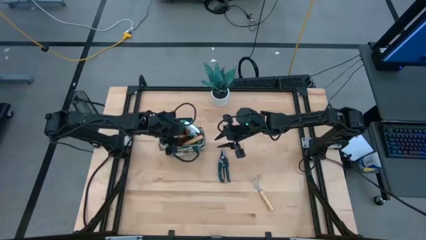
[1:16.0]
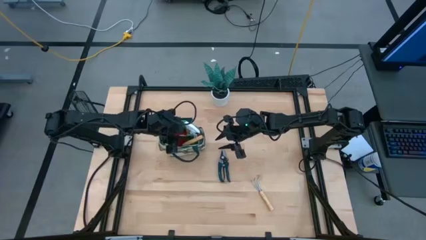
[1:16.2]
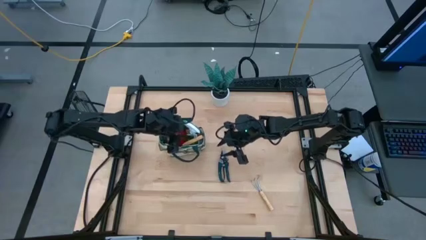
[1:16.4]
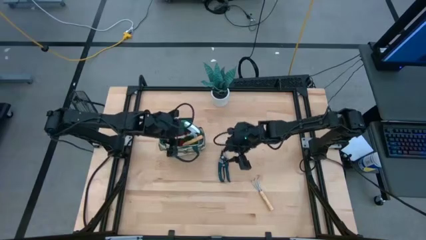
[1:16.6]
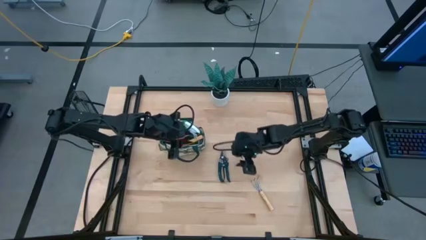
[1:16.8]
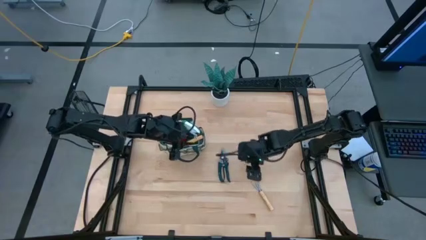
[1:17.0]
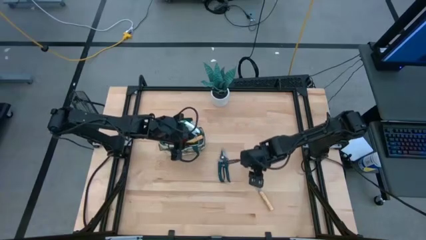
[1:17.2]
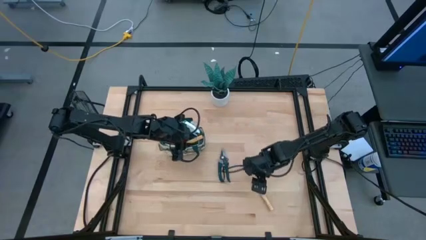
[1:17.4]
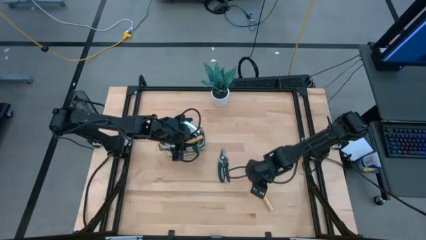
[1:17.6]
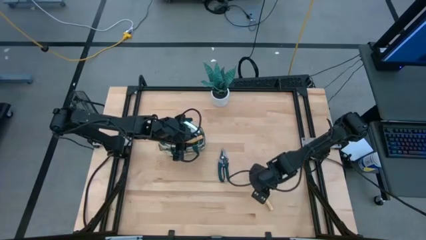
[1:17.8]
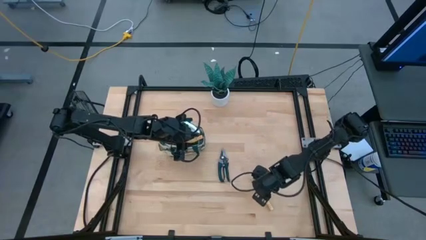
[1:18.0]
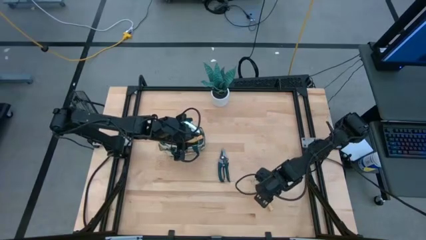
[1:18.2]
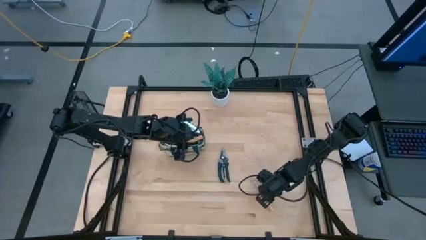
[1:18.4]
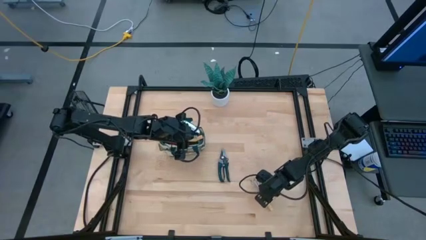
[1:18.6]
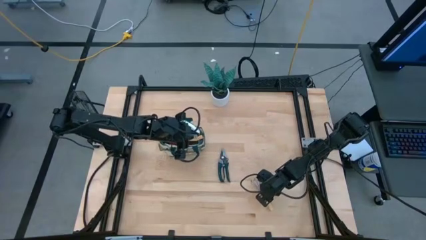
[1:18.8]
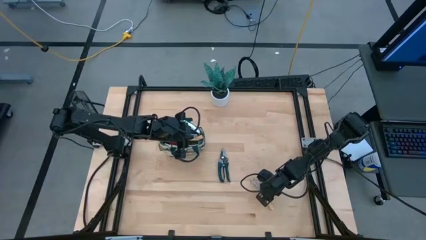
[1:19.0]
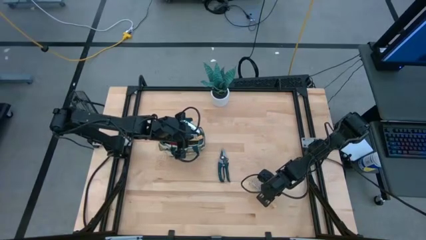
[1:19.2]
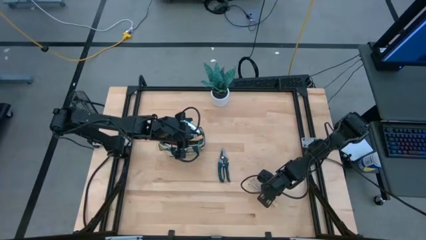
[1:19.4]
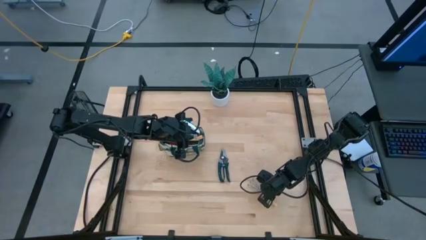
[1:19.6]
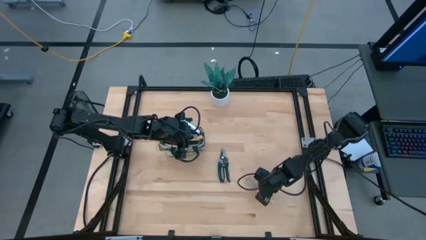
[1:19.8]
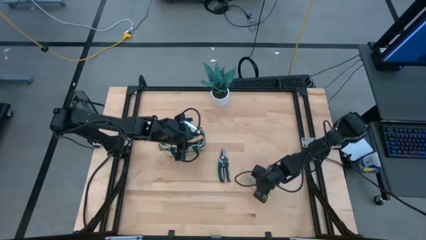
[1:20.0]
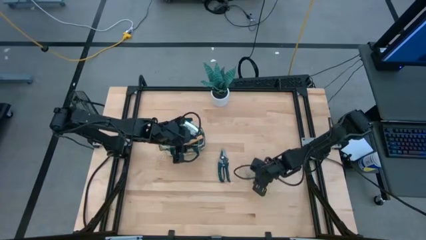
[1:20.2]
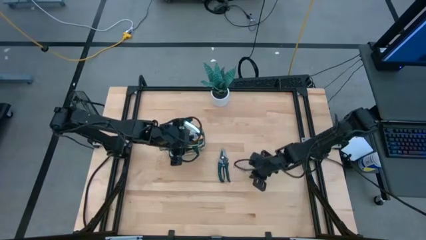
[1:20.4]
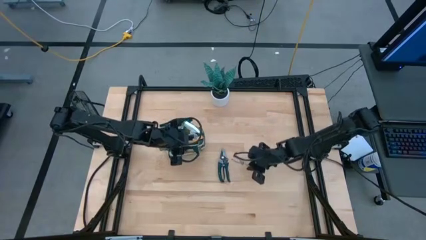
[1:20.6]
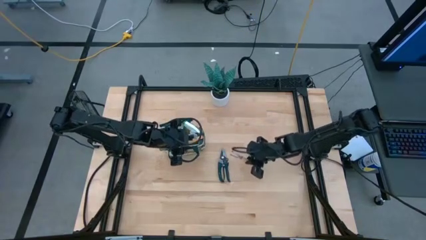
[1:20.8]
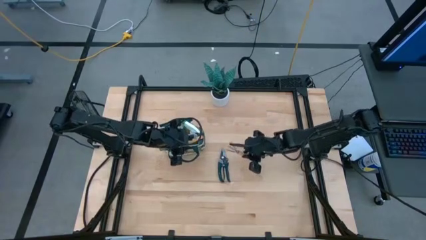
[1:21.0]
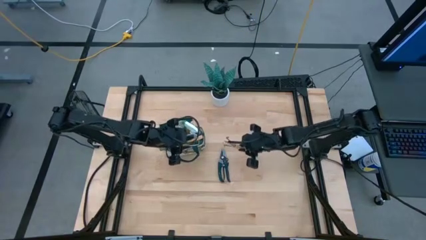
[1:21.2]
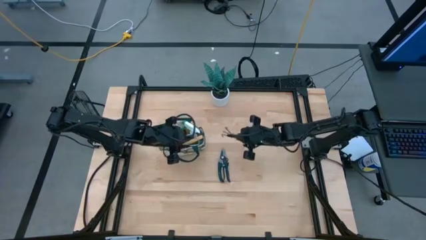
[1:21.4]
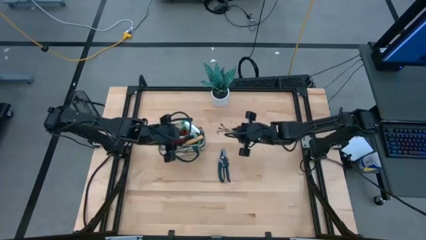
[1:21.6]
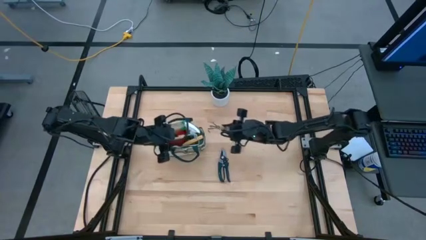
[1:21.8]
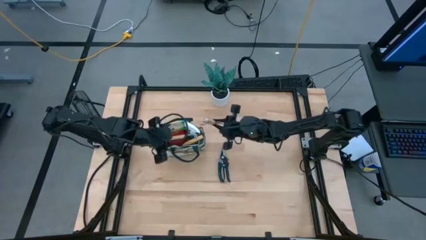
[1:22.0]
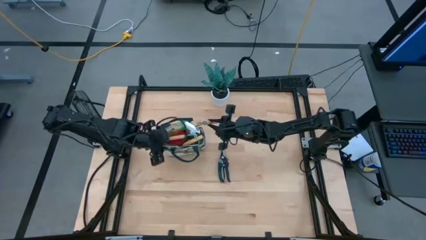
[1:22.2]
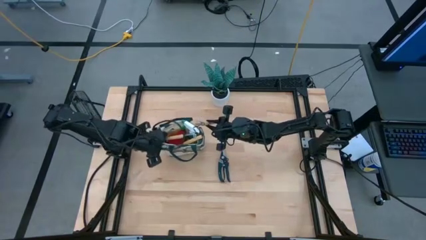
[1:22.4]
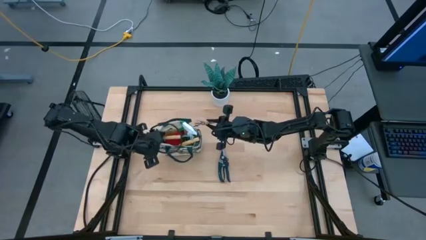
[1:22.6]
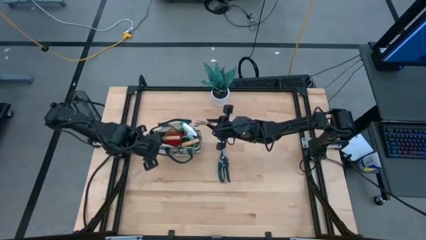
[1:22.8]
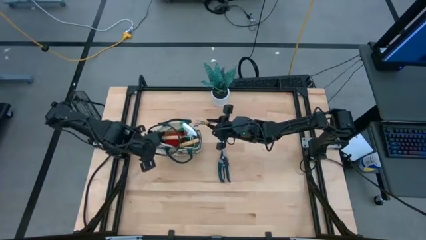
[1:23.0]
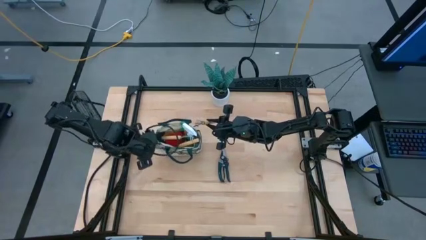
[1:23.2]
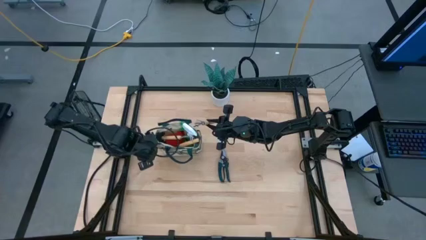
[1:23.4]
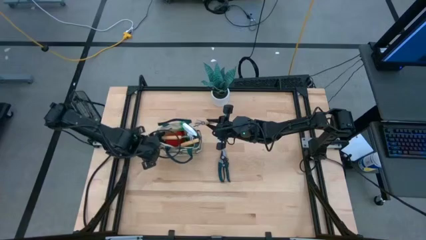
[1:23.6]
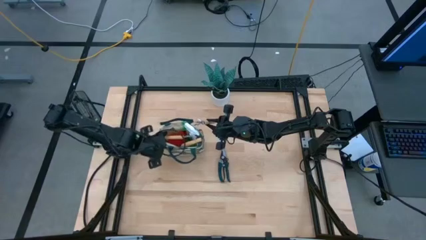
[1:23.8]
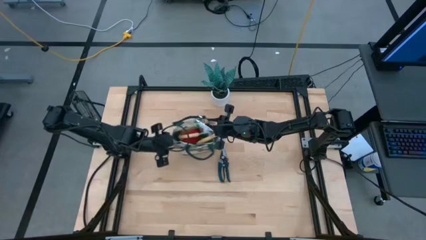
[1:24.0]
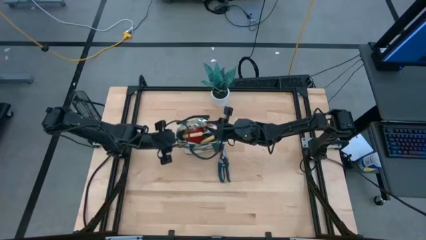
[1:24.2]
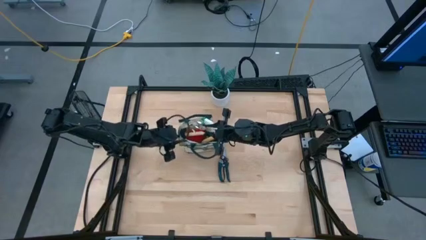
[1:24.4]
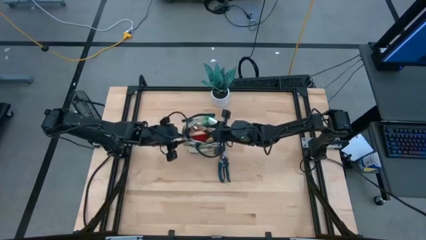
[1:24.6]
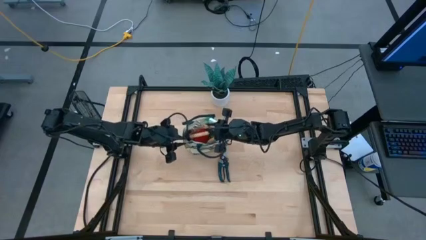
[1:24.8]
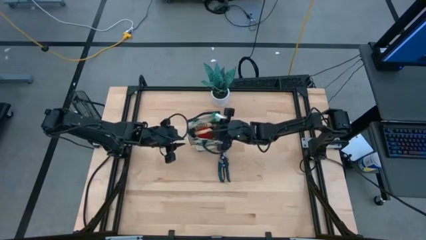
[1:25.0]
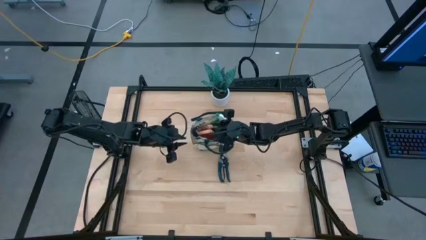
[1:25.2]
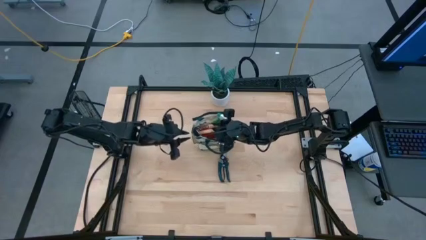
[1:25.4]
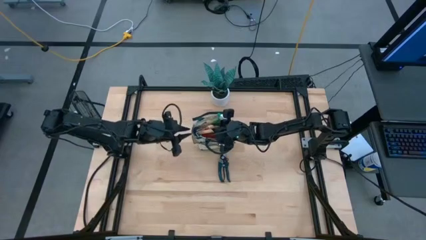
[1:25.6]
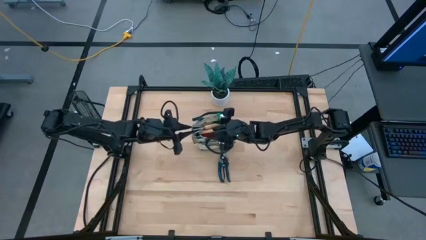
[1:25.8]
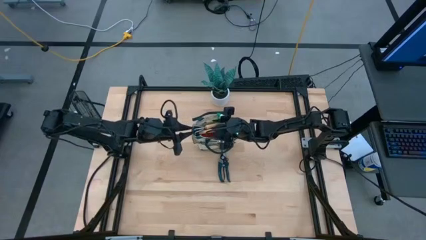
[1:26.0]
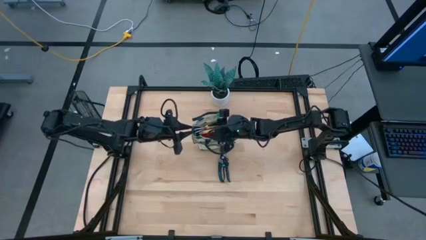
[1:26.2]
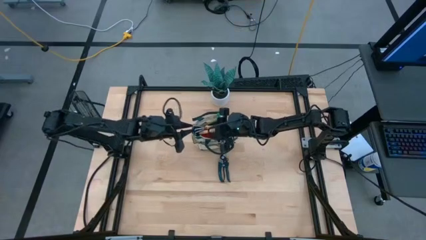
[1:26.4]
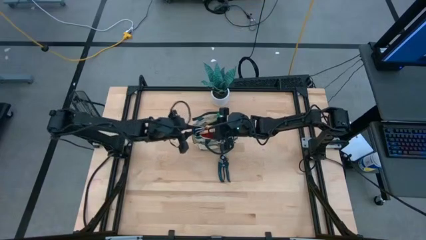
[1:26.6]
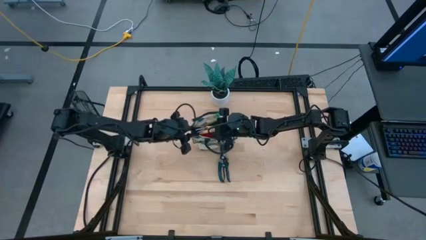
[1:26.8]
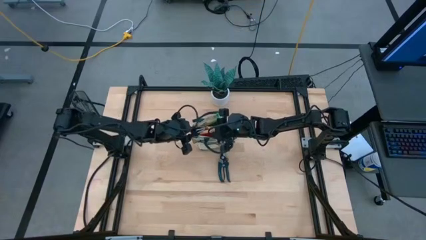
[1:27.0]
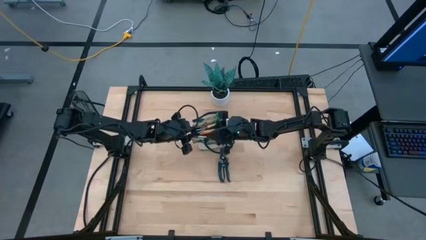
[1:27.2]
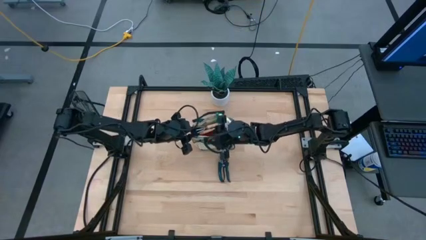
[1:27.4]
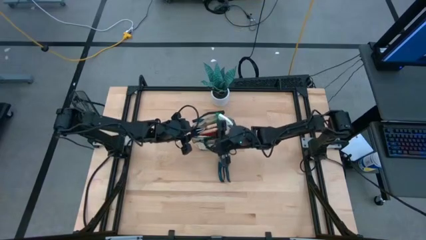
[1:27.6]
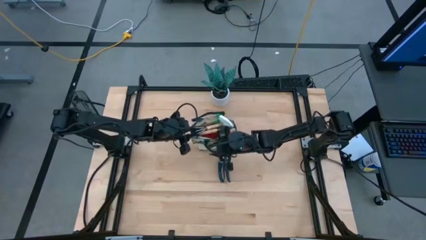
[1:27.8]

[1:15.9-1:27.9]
Task: Pick & Place Garden tools in Gardening bag
Put the brown hand rake into the brown gardening bag
